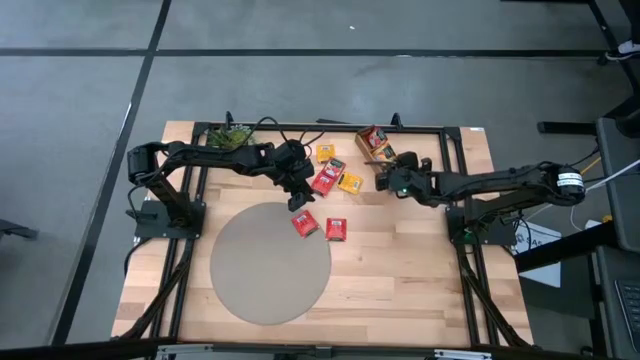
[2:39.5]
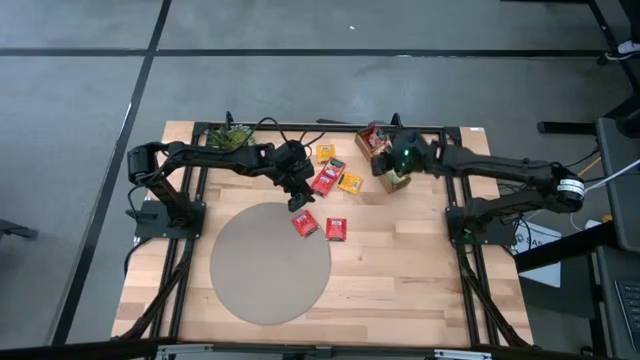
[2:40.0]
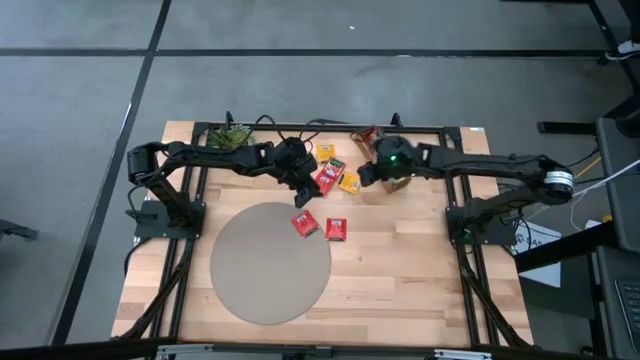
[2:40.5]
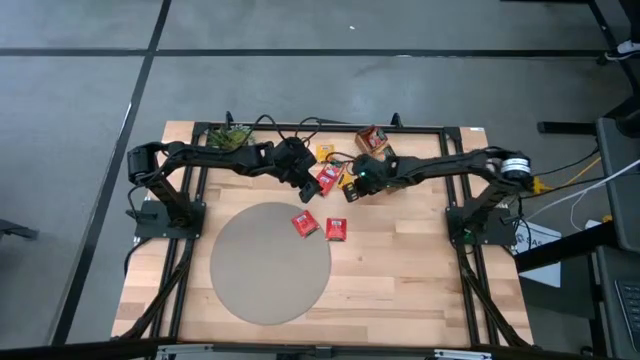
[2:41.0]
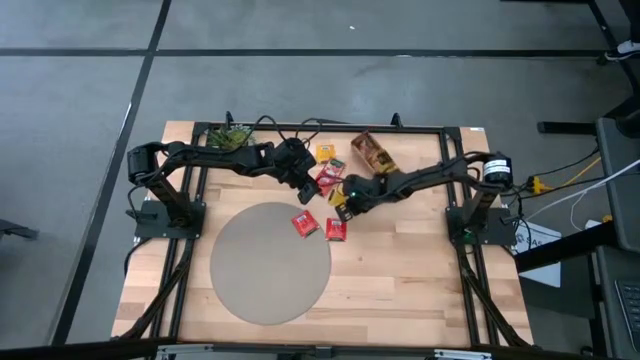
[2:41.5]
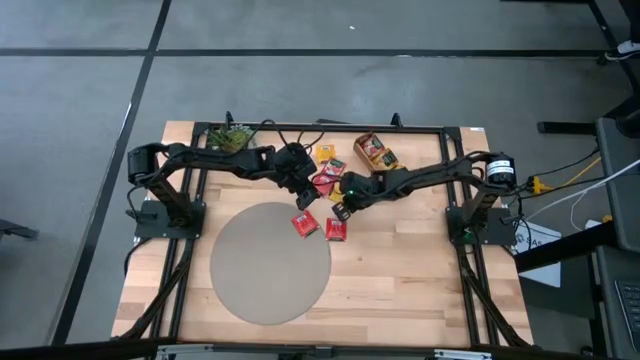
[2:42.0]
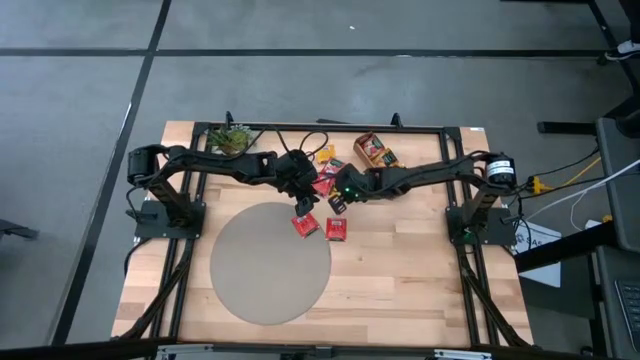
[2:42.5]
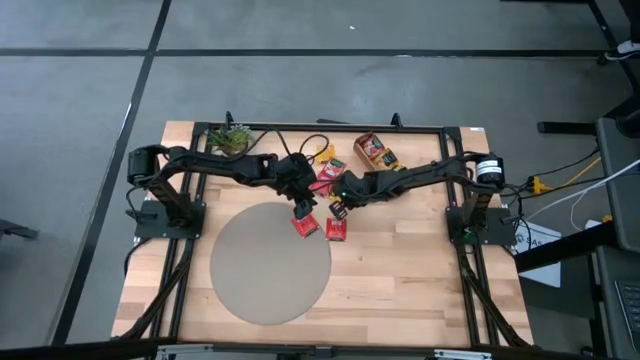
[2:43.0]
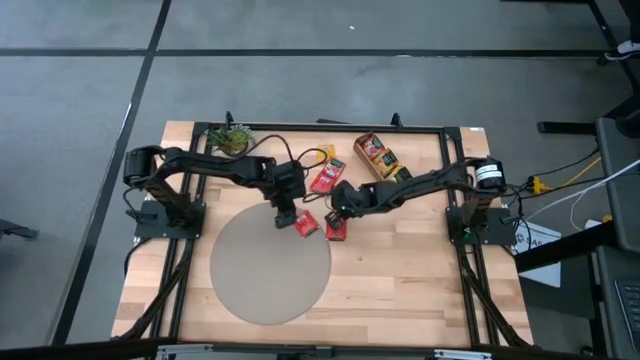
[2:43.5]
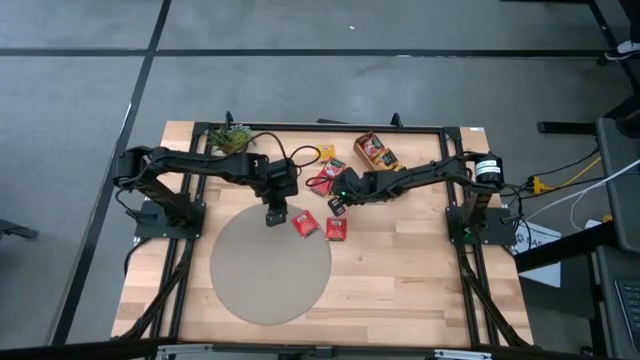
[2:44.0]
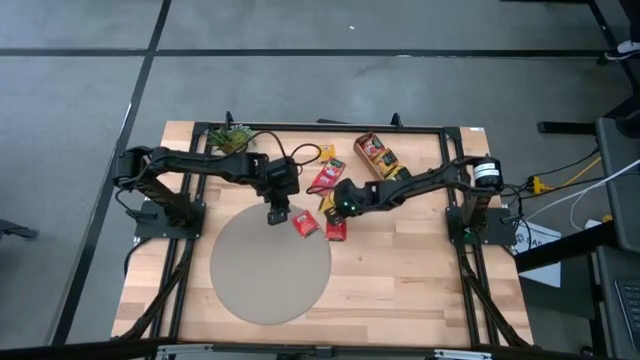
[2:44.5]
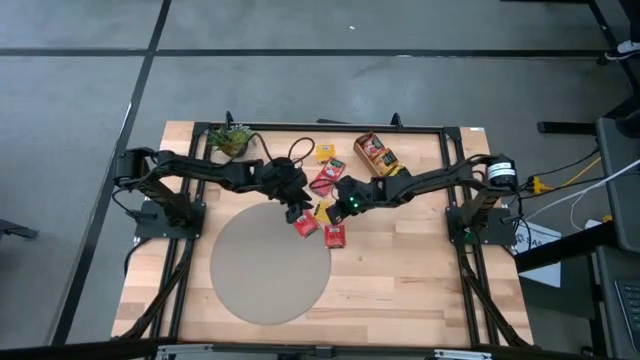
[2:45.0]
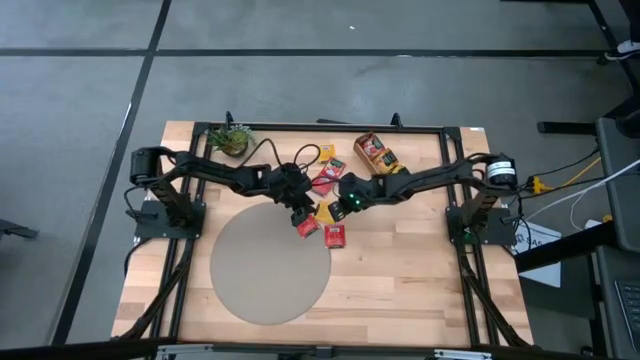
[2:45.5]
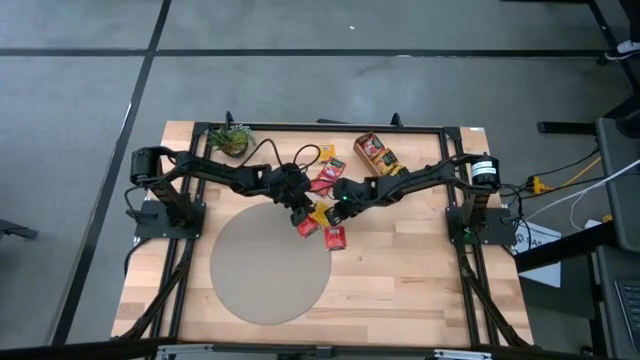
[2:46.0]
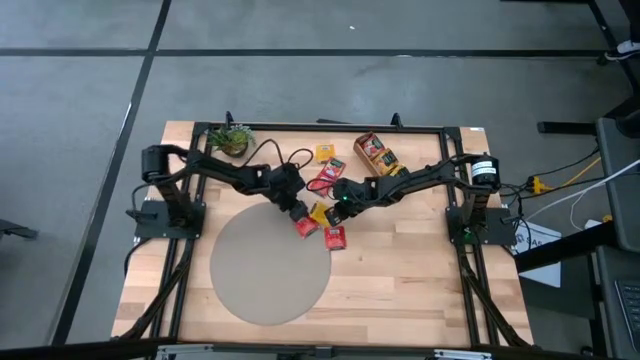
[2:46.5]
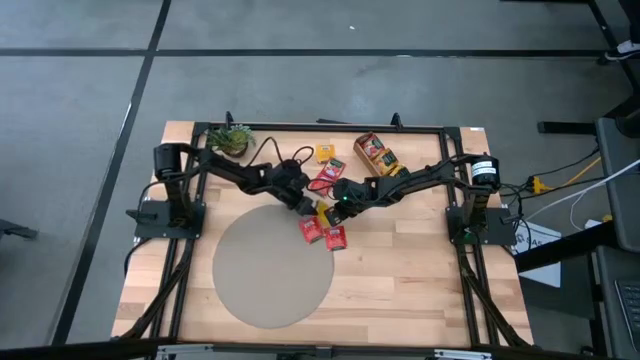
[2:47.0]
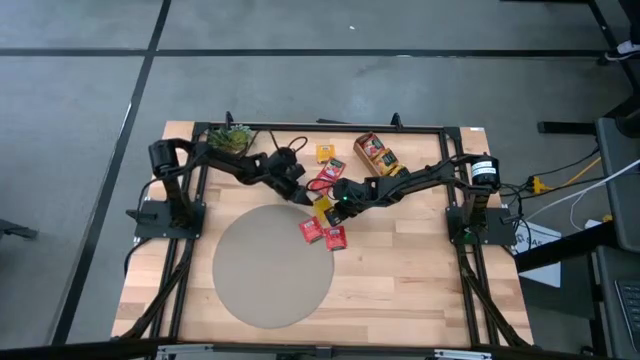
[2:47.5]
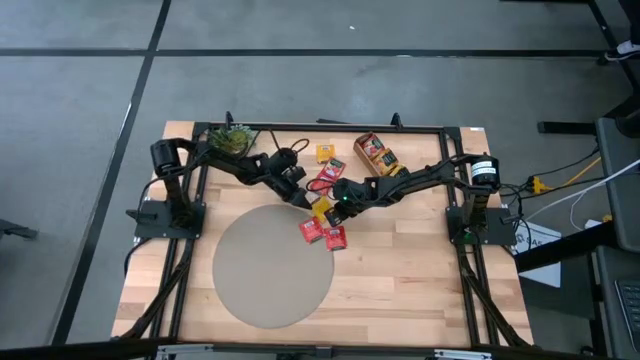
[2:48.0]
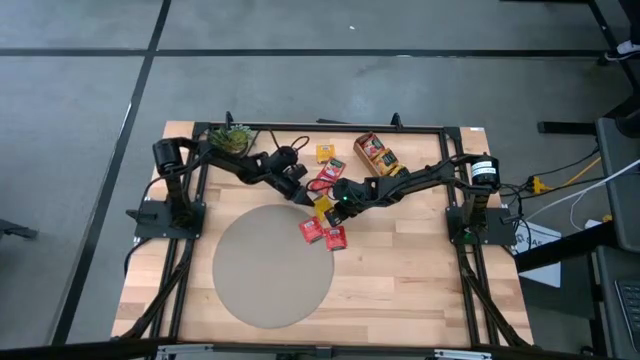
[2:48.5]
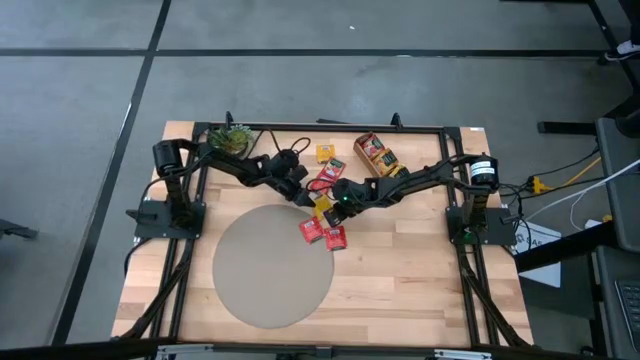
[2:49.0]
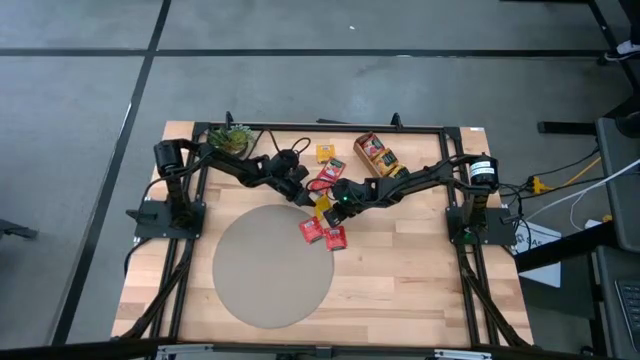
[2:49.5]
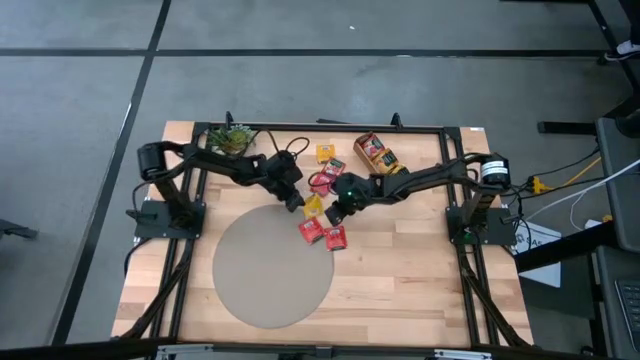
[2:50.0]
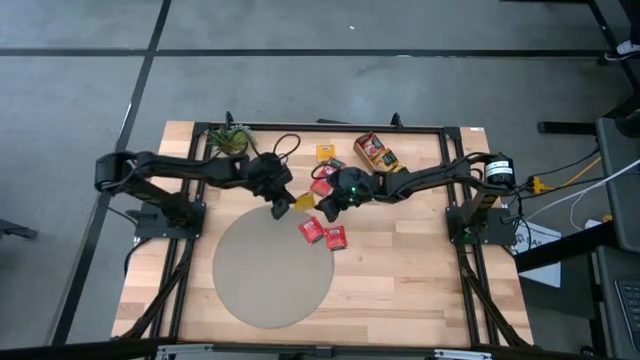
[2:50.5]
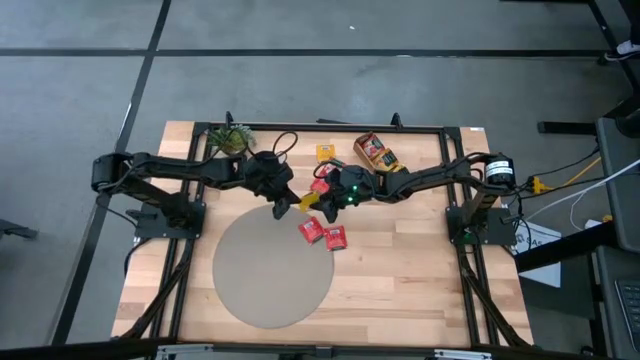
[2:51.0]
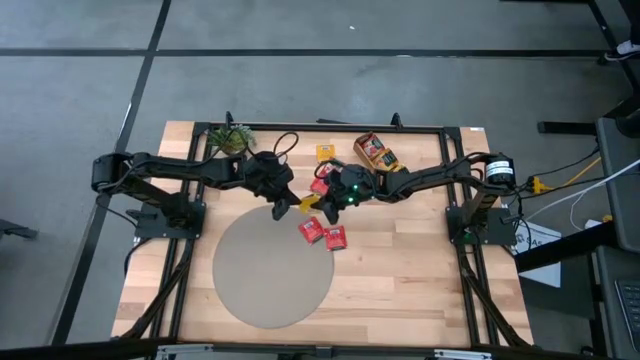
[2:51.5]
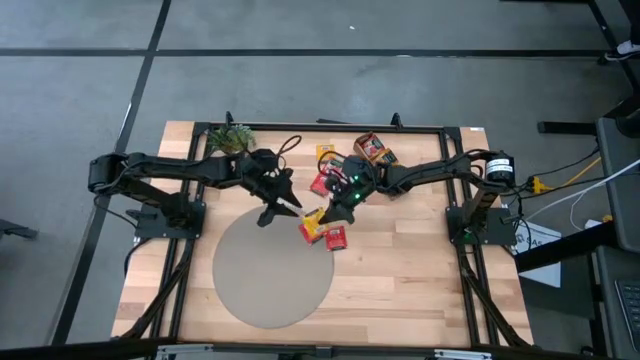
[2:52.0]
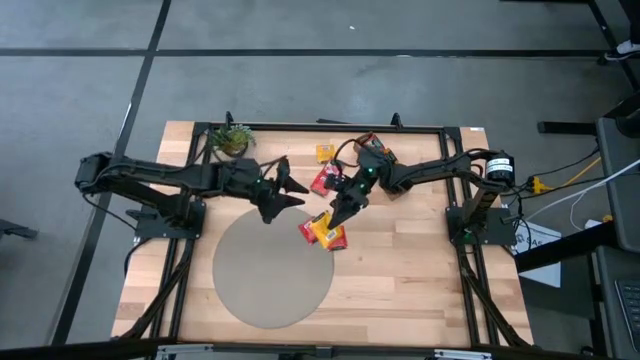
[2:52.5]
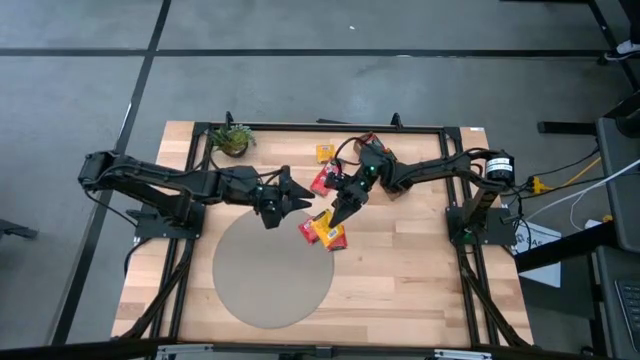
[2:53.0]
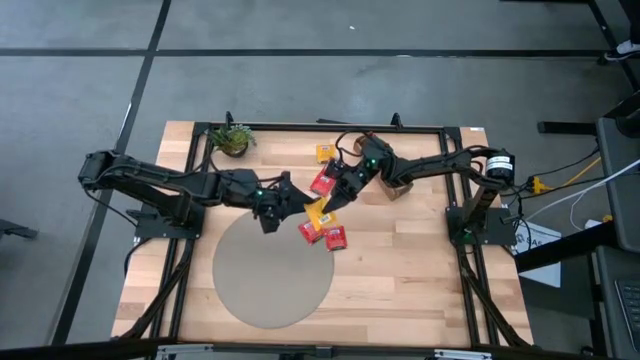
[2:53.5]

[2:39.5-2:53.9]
Task: Pick & Place Tea
Put the orange tea bag into the middle section of the wooden organizer

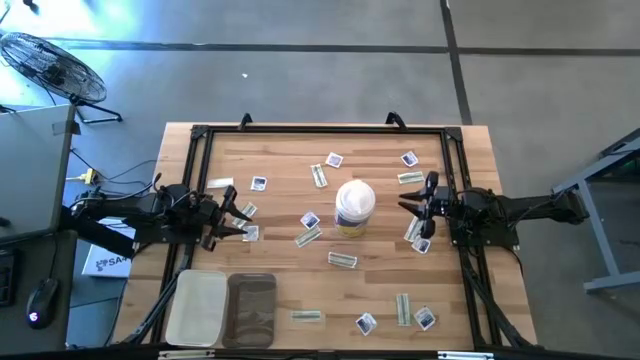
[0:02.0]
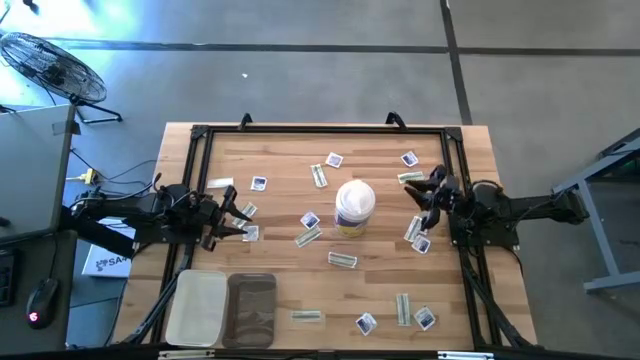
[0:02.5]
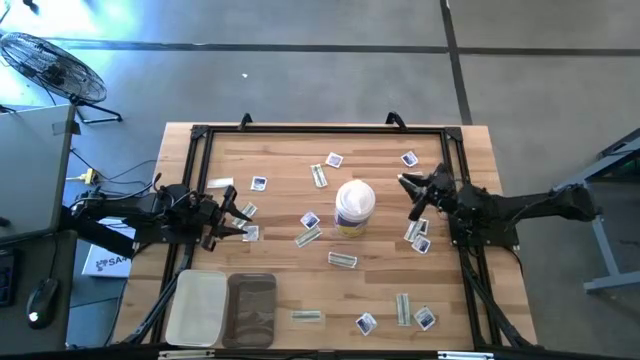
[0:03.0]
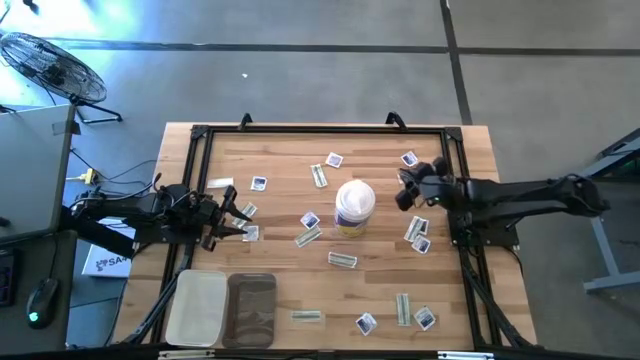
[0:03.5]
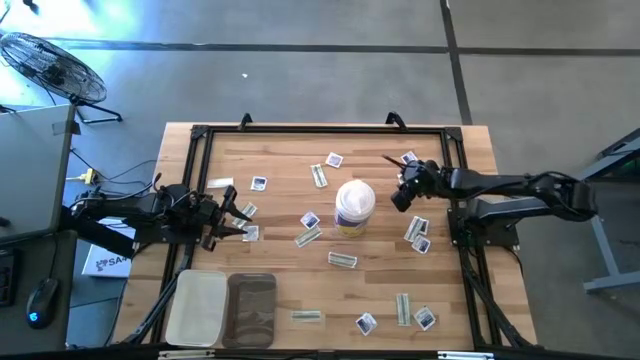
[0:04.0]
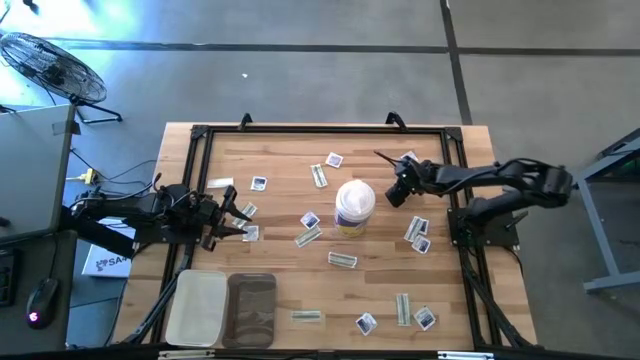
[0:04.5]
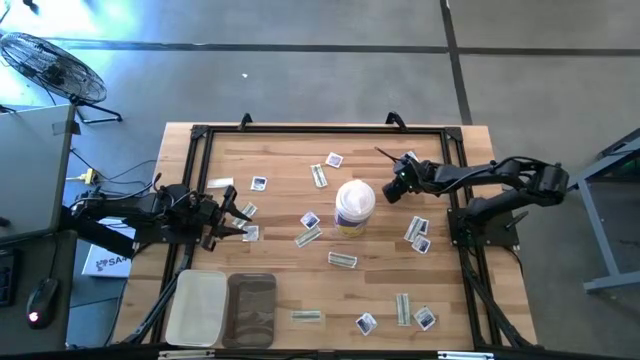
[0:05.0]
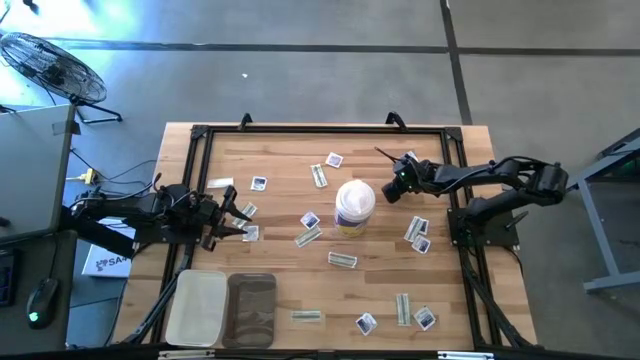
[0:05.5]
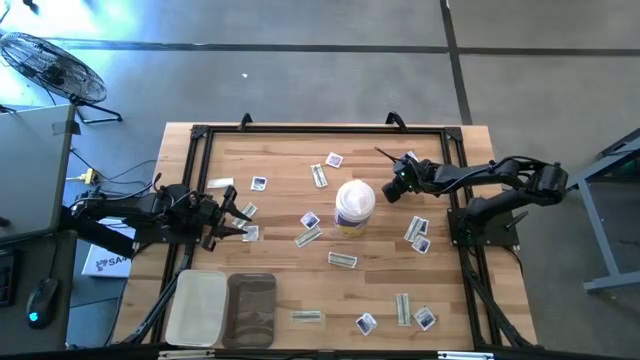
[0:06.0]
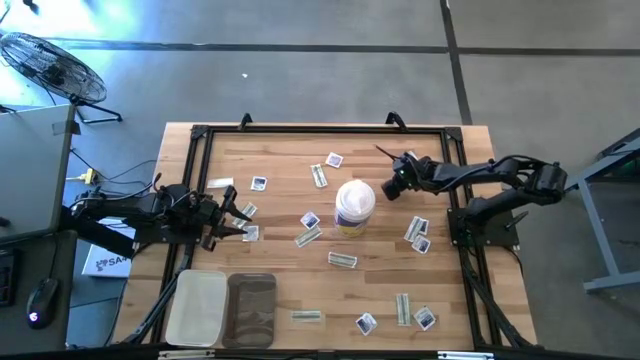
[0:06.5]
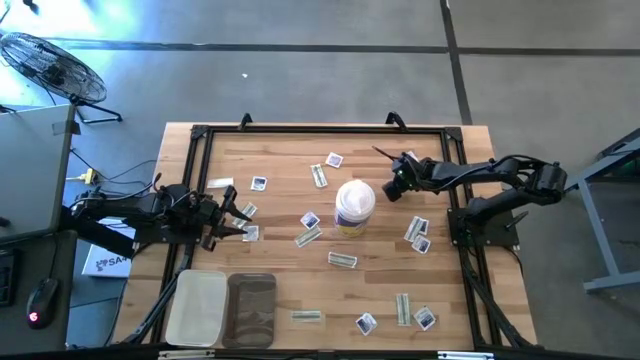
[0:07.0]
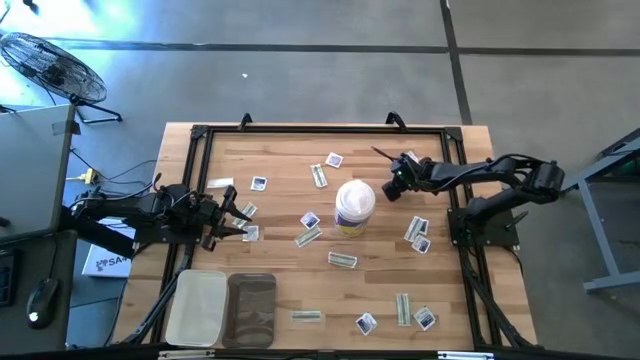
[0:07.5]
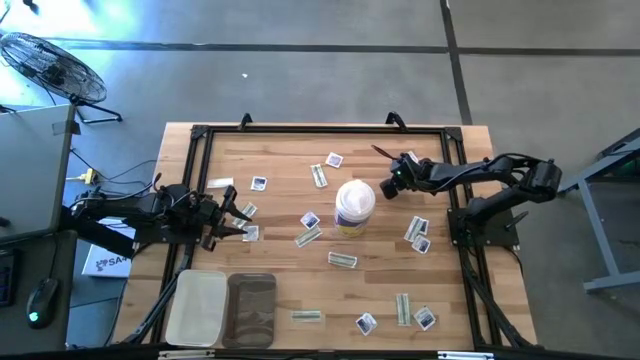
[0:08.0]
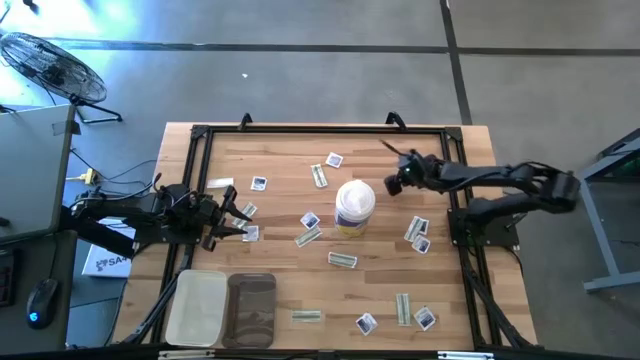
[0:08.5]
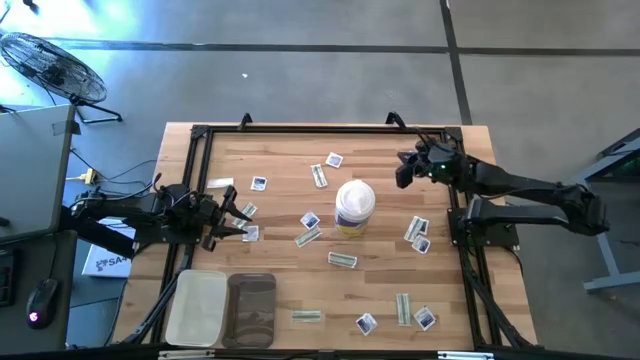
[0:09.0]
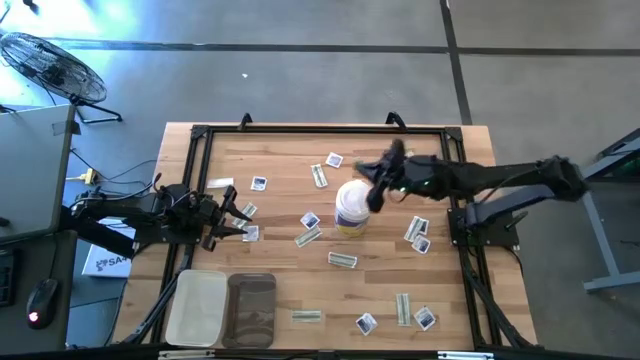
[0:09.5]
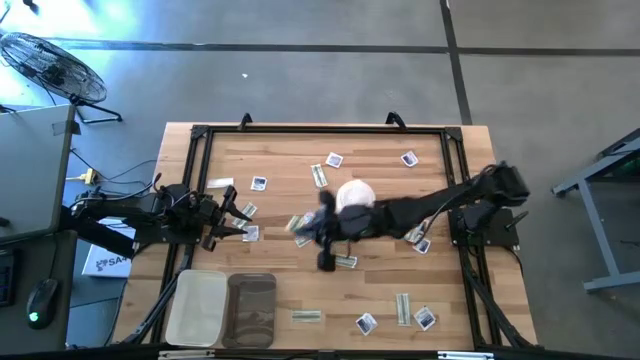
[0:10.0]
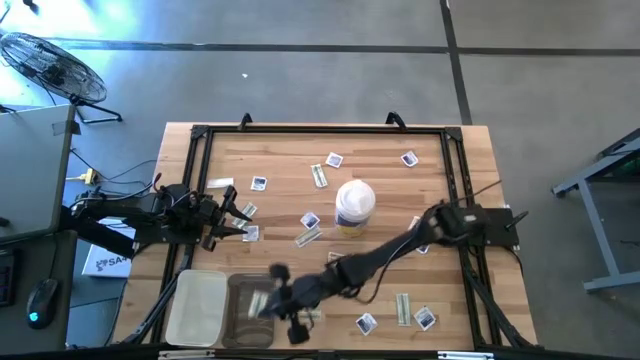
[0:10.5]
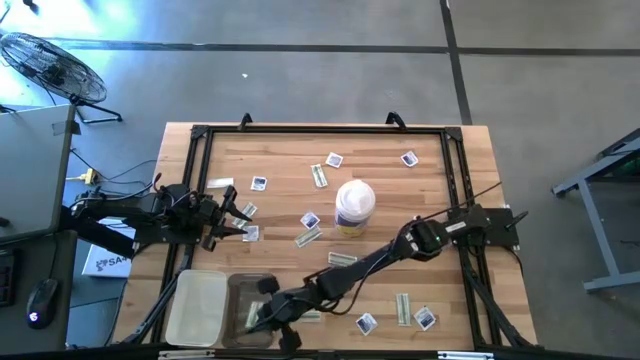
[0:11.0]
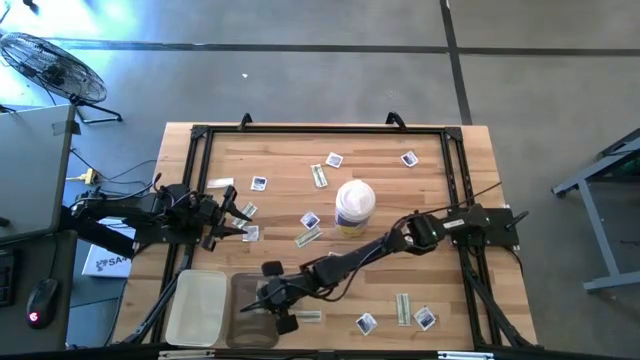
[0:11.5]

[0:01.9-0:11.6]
Task: Pick & Place First Aid Supplies
Put the bandage into the black transparent bin
